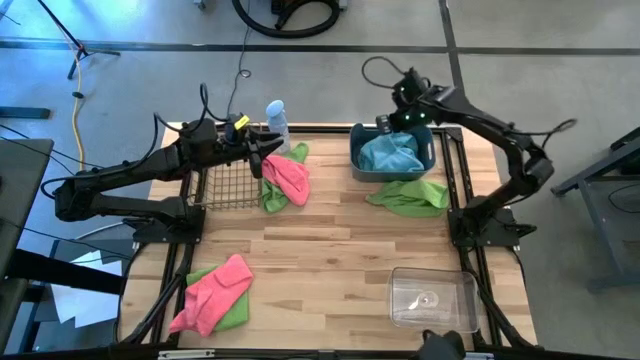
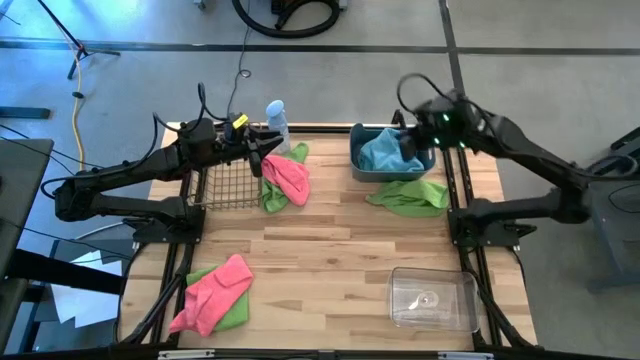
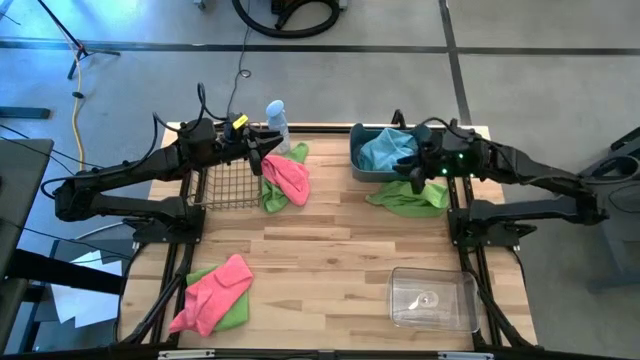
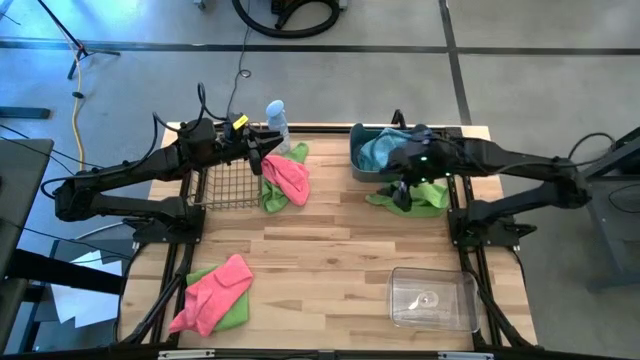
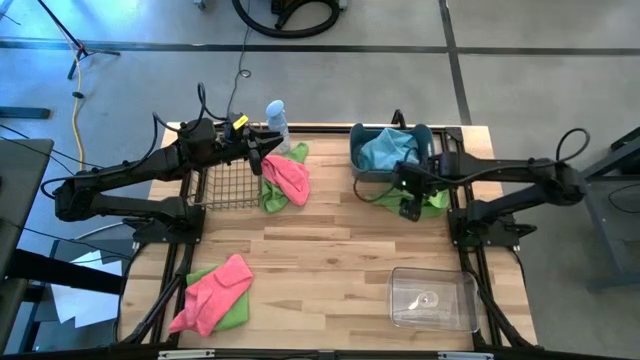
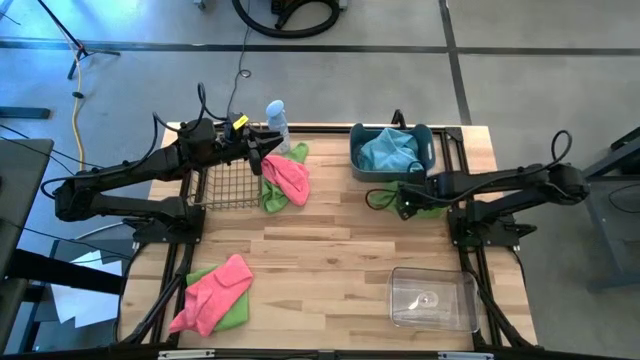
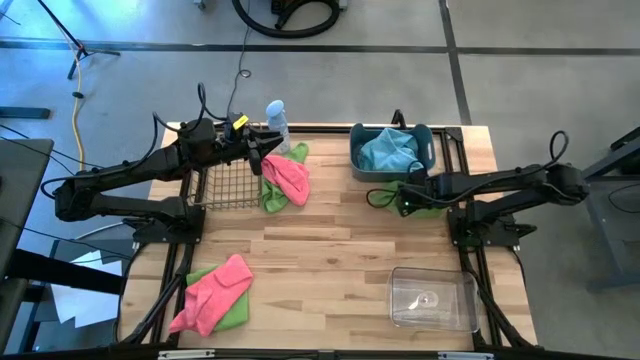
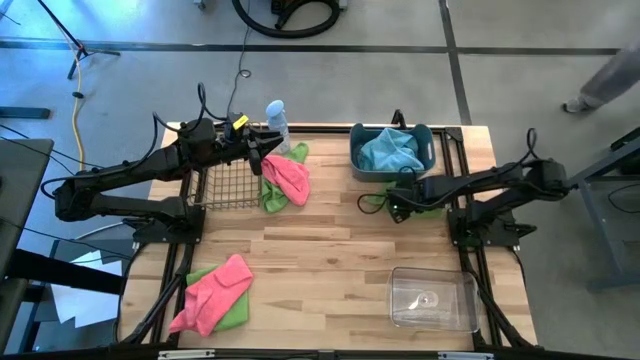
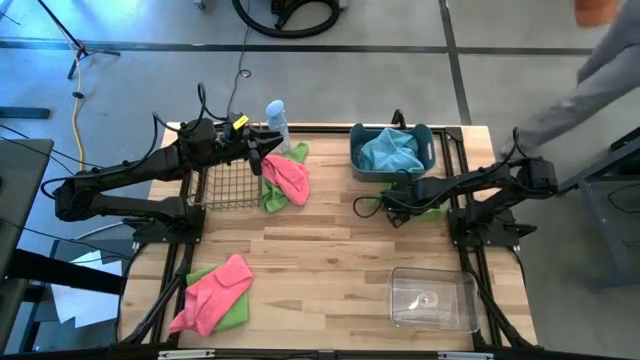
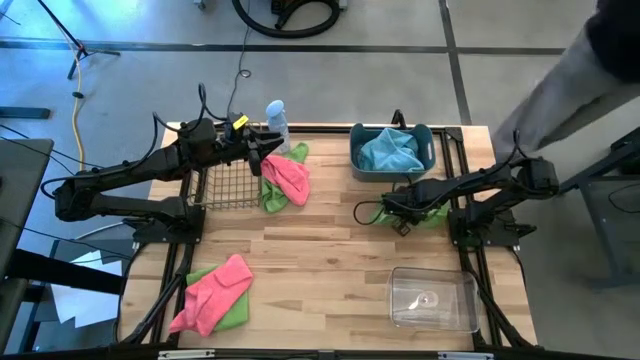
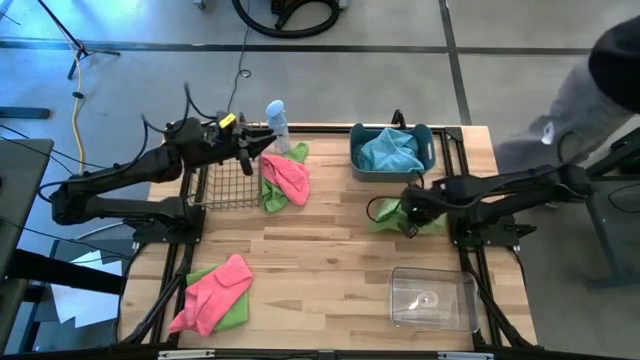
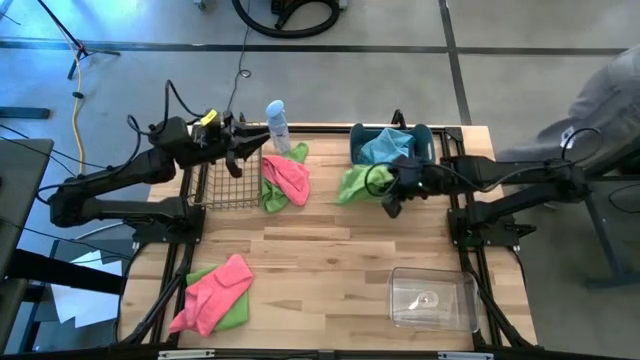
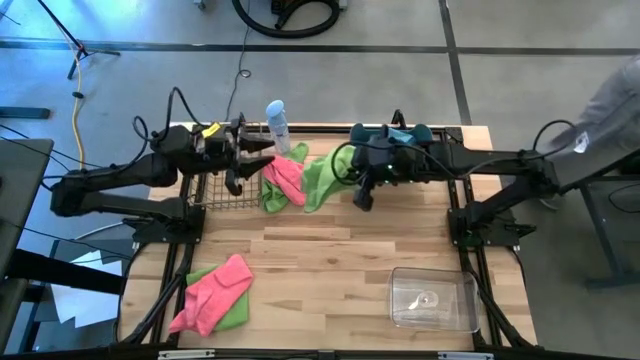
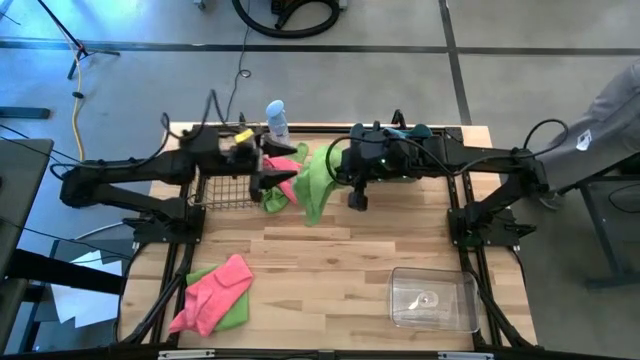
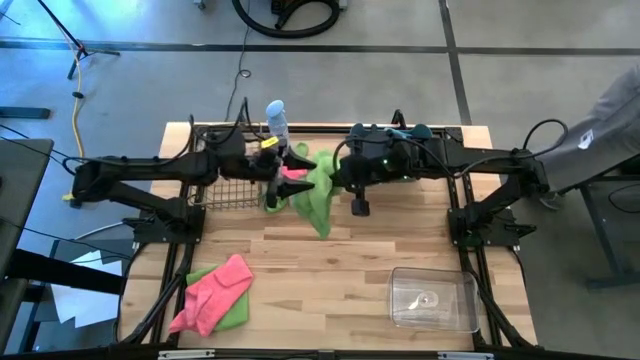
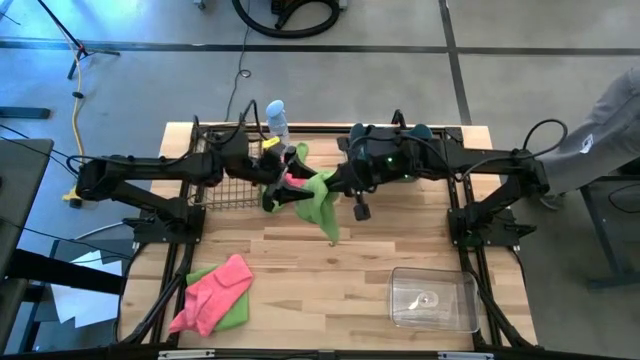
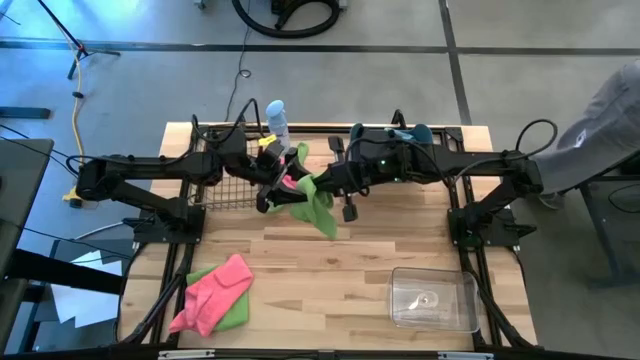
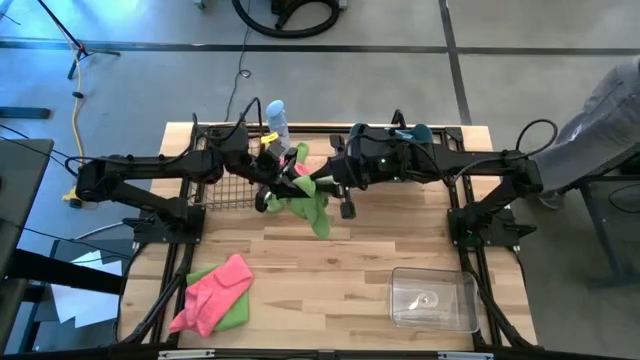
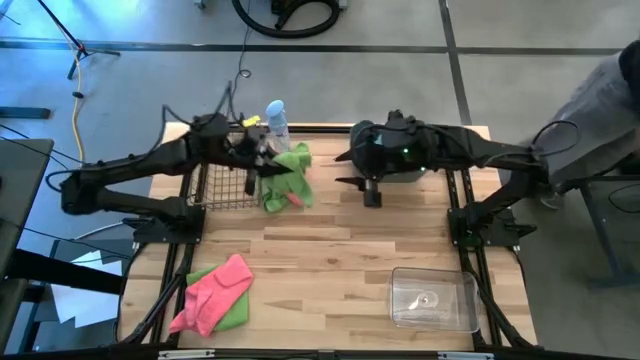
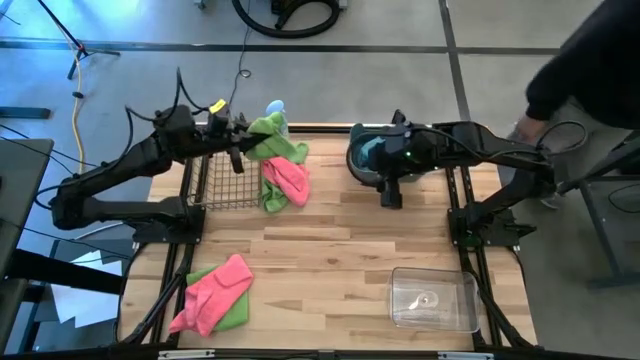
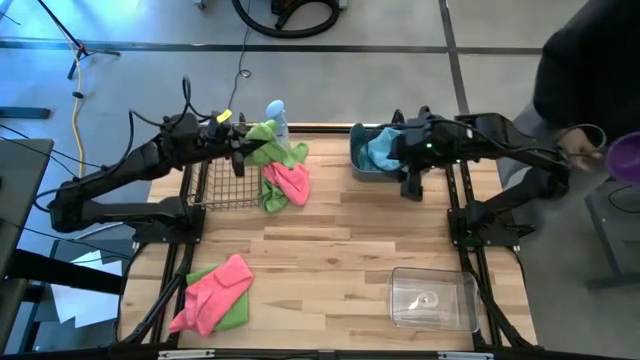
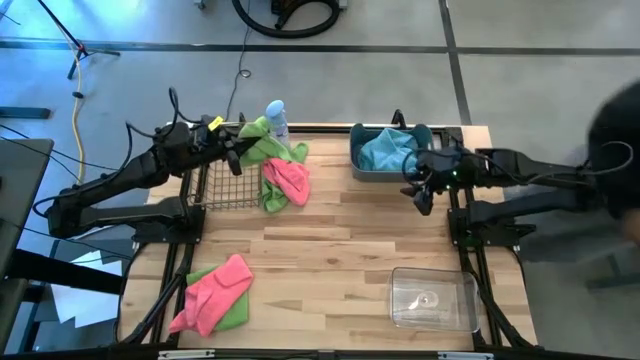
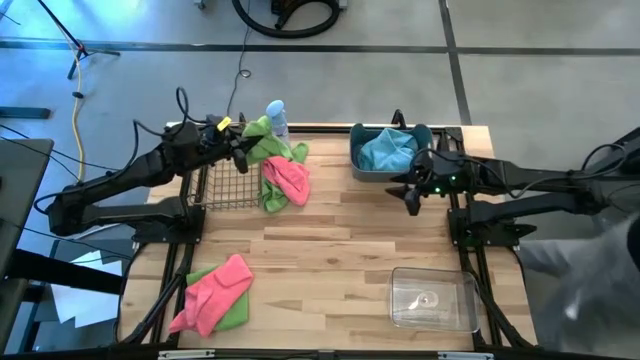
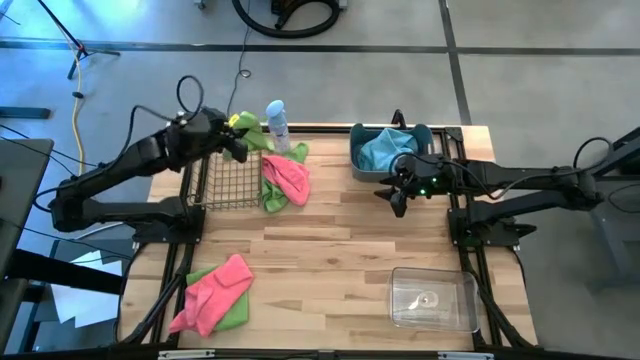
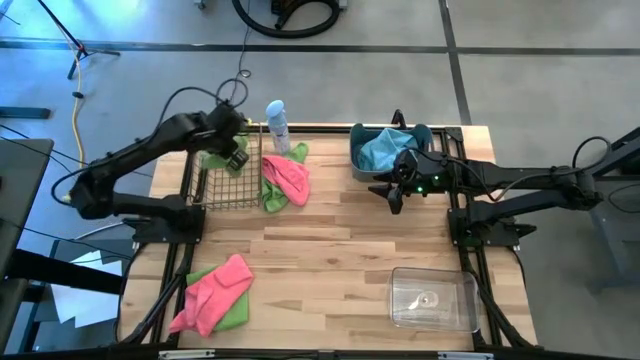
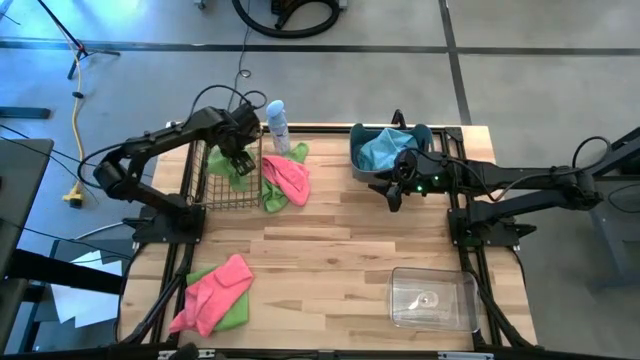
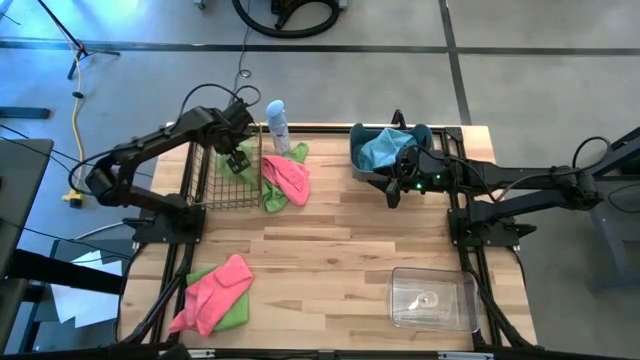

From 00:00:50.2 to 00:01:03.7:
Task: Sort microfiber towel by color & place in baskets
Put the top right green towel into the wire basket

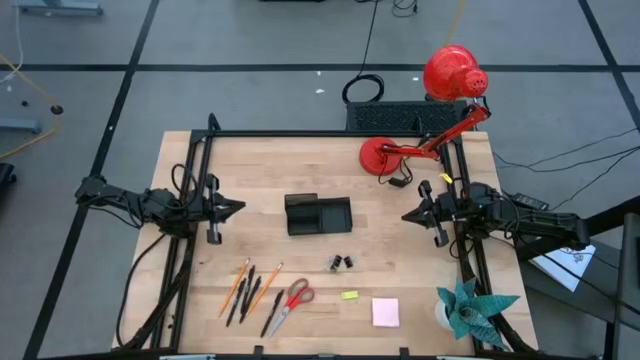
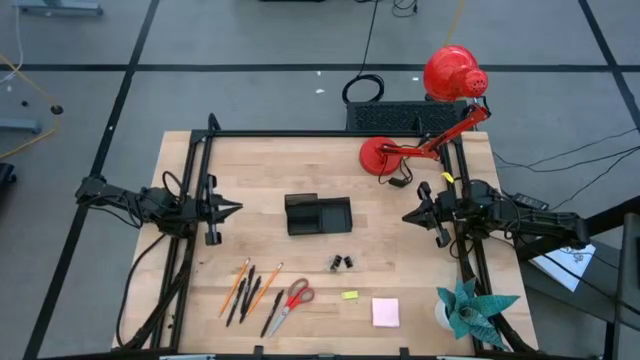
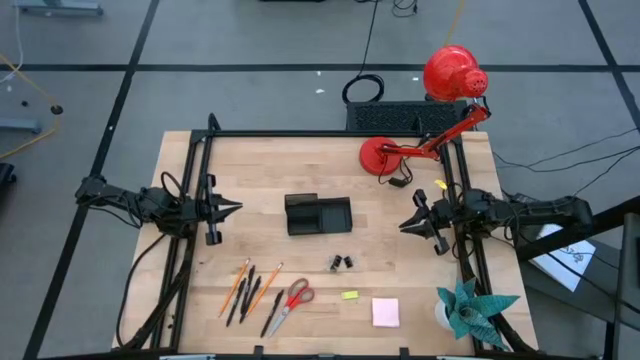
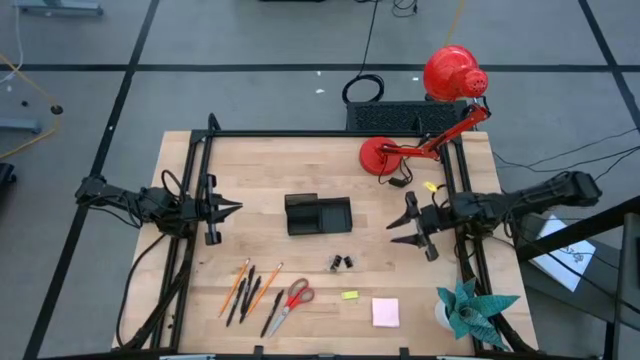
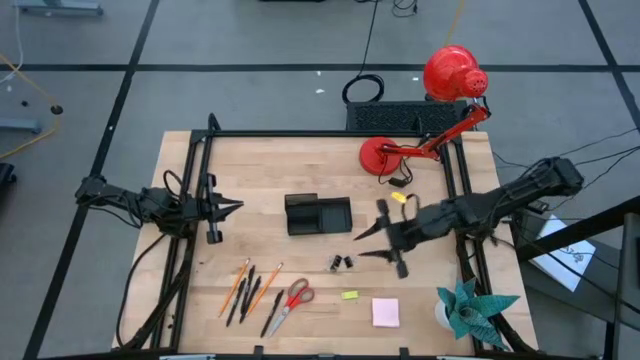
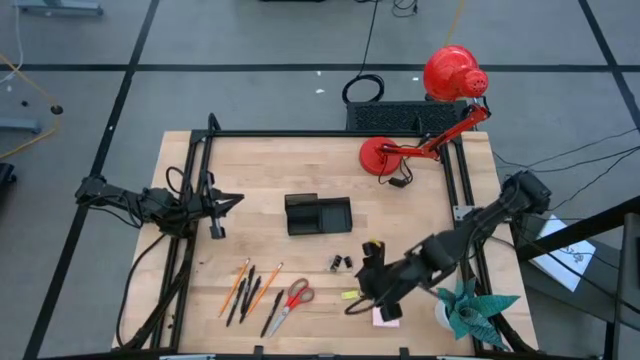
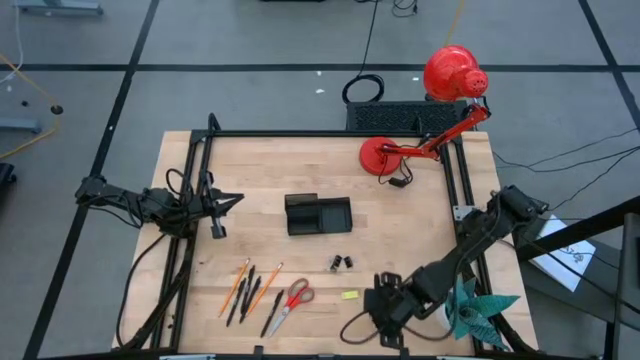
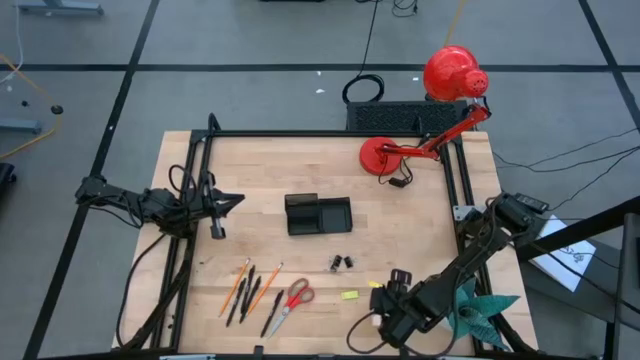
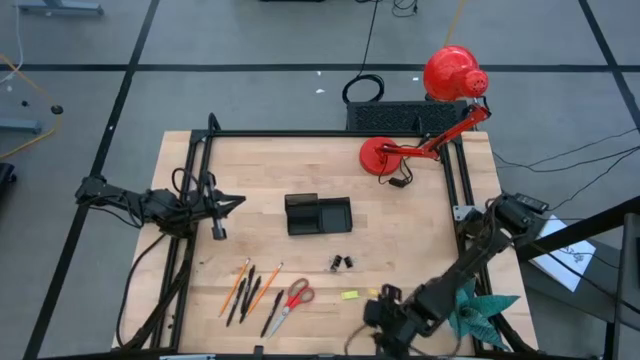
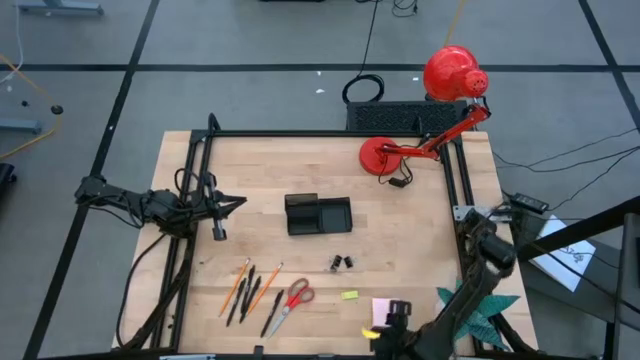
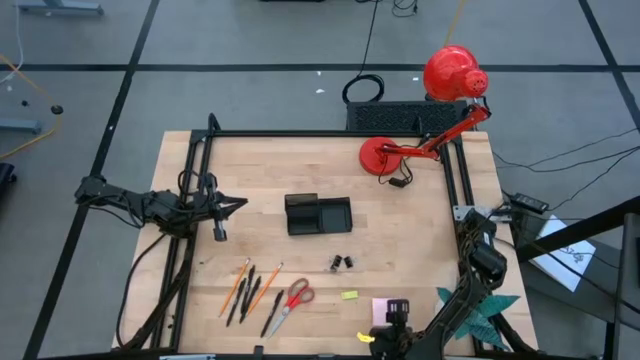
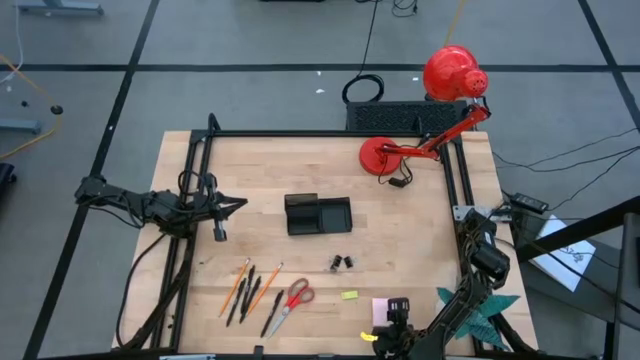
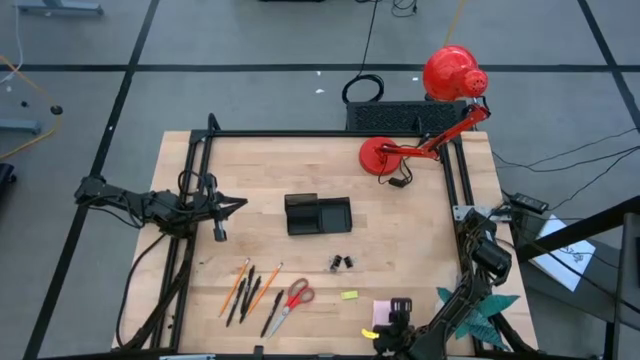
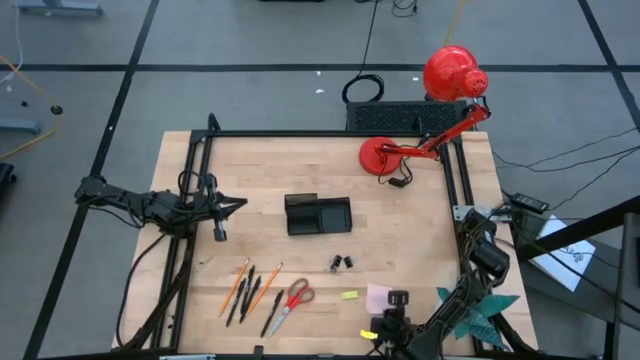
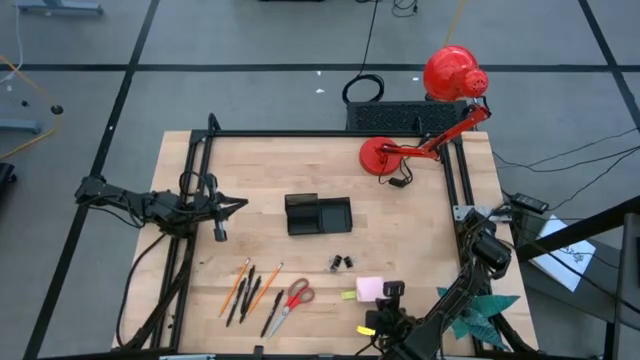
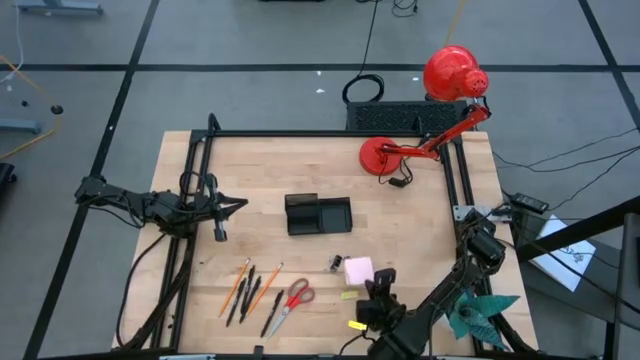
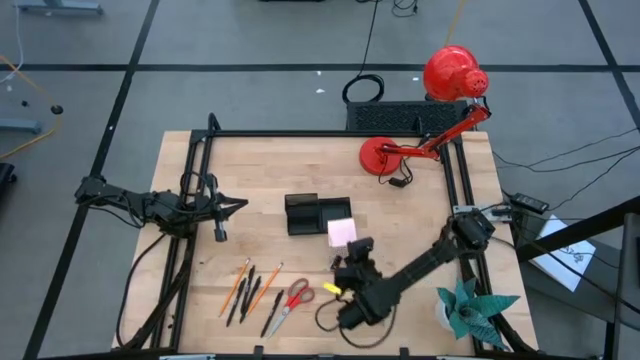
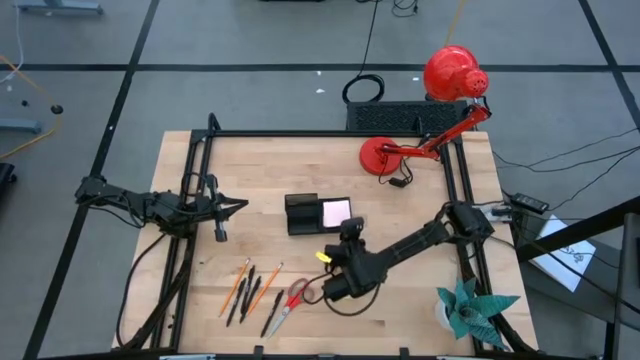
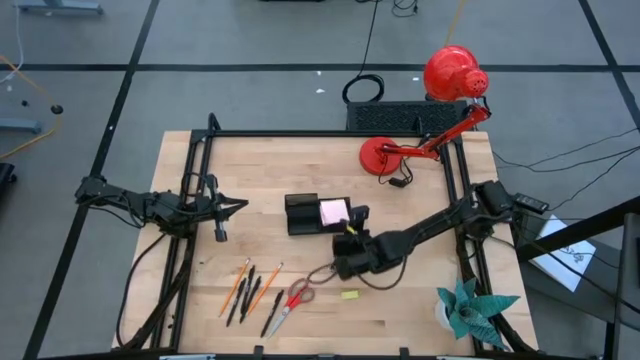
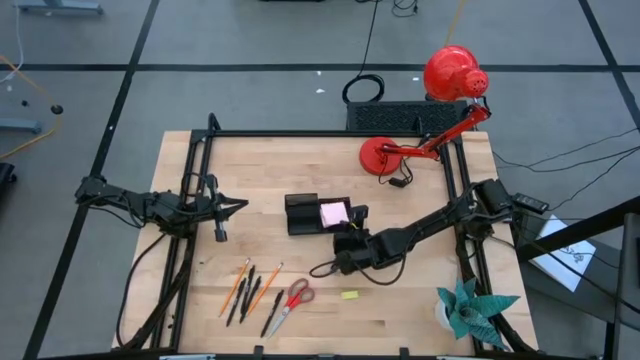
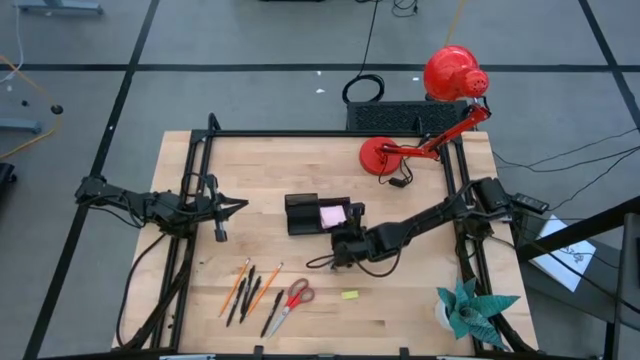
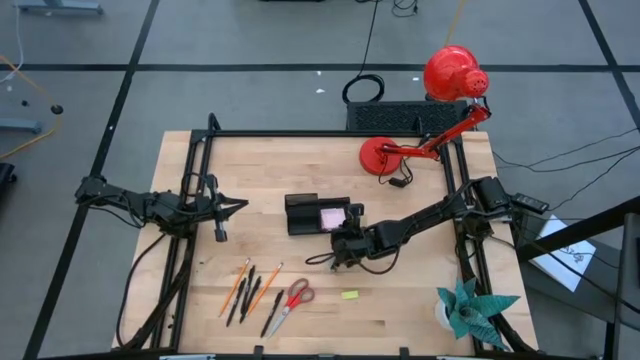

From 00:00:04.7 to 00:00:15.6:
Task: Pick and place office supplies into organizer
Put the pink sticky note into the black desk organizer
